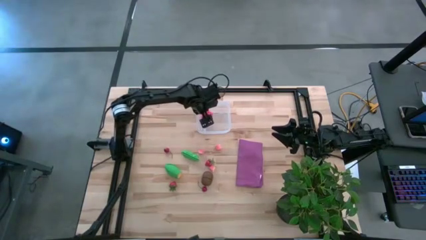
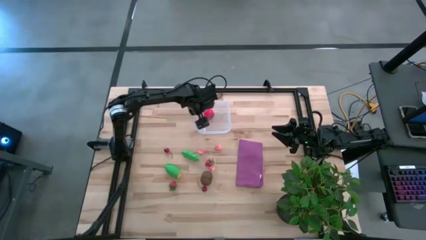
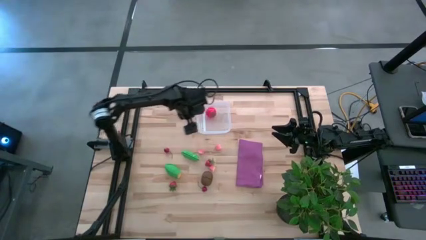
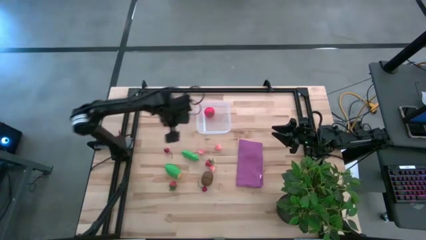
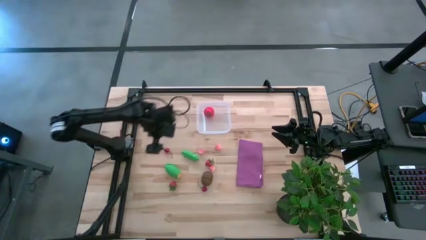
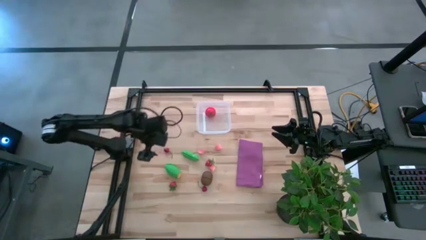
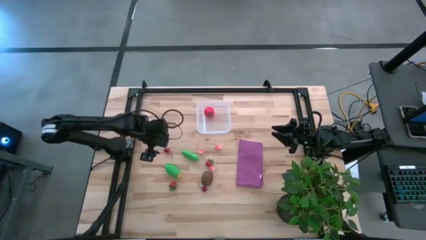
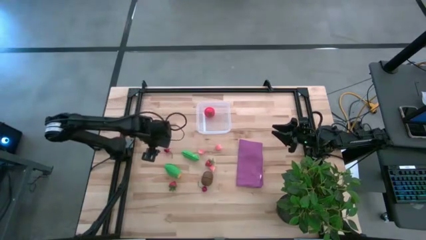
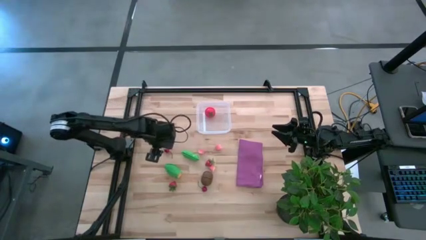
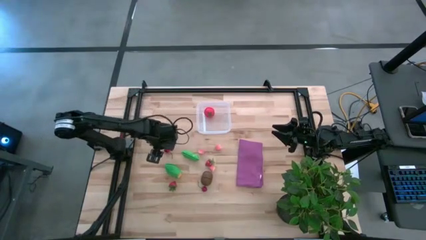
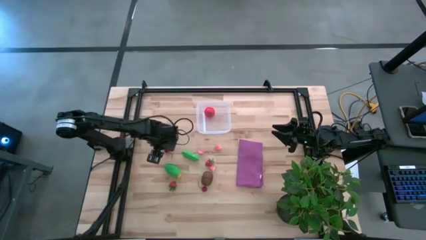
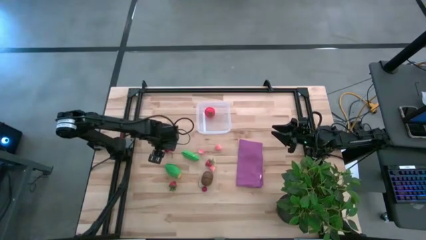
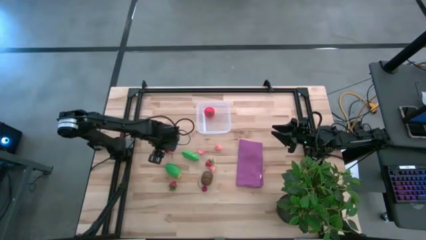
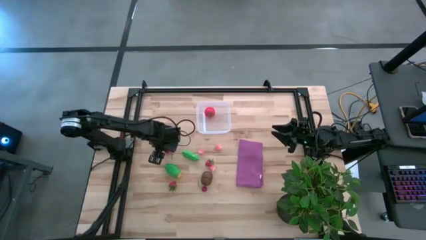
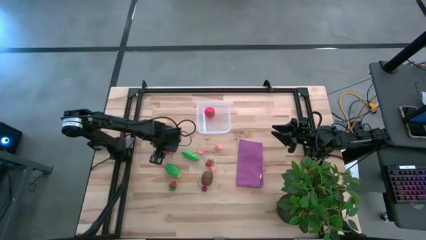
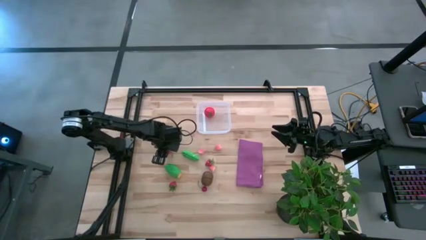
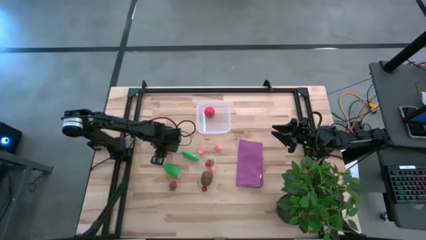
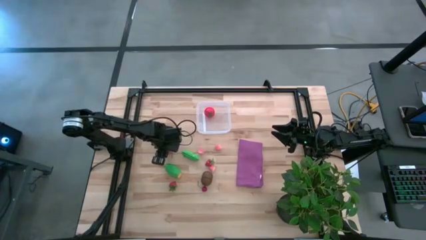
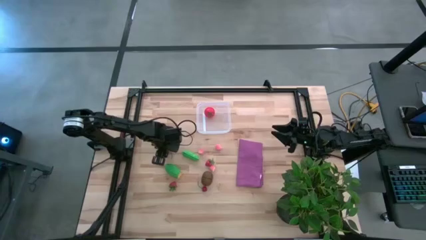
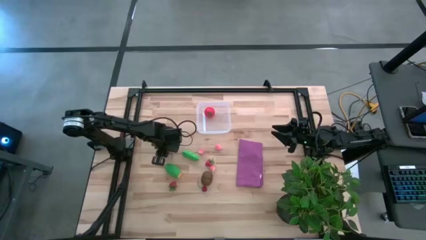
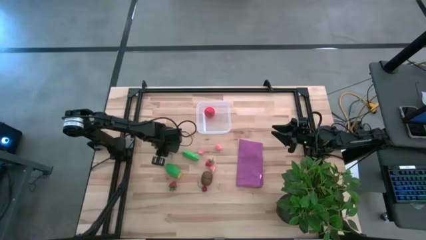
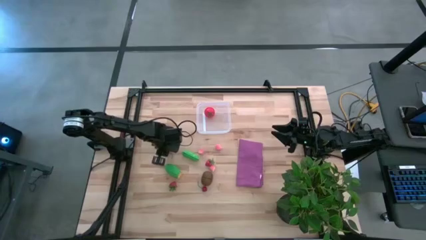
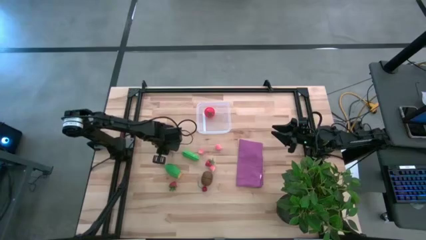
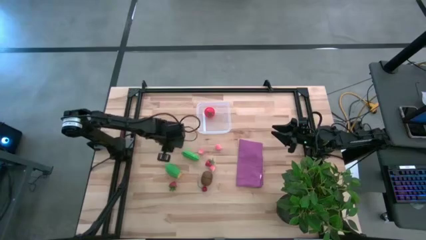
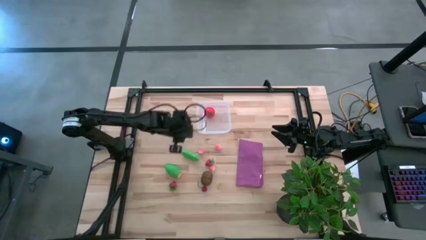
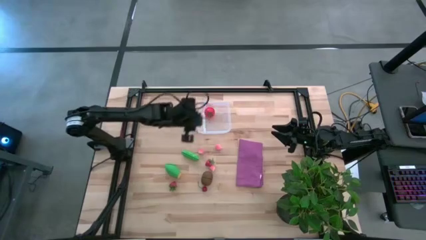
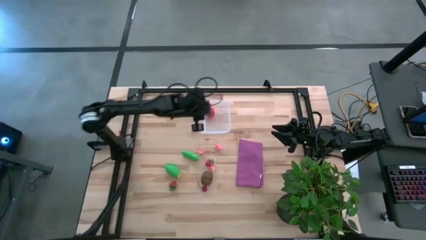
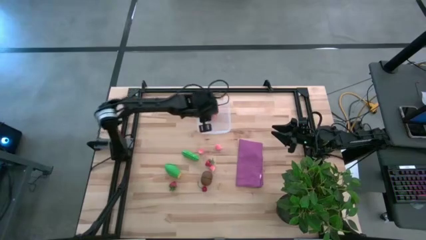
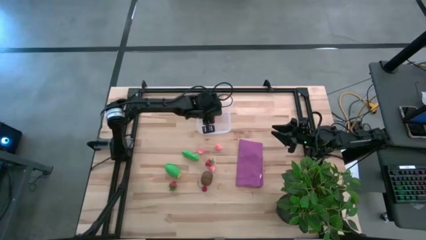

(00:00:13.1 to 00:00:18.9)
Task: Pick and placing Produce into tupperware
Put the top red cherry into the white bin

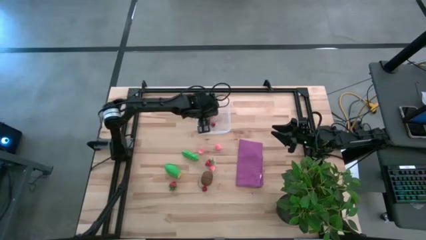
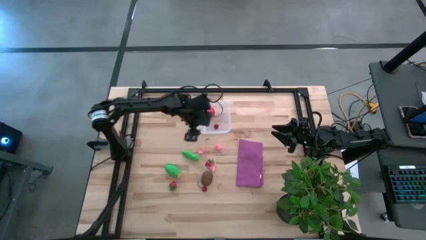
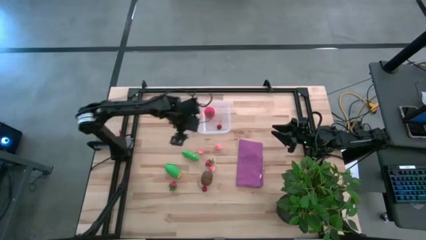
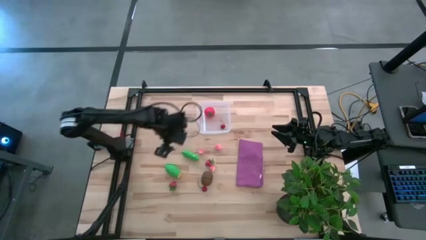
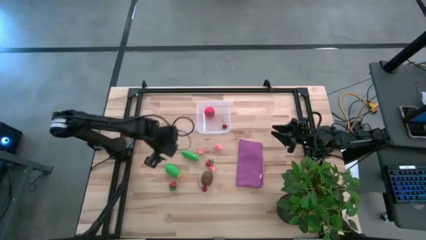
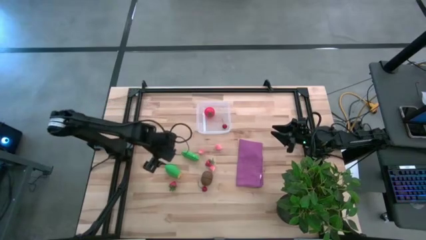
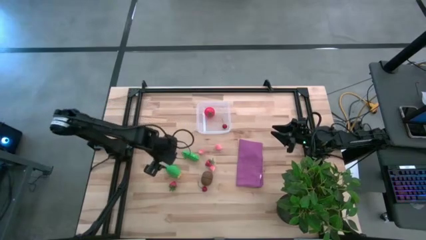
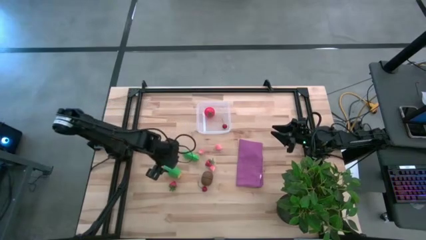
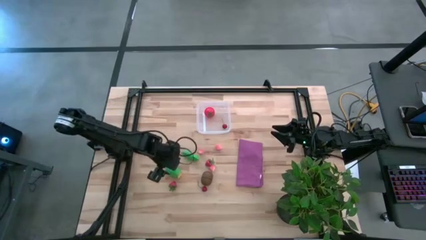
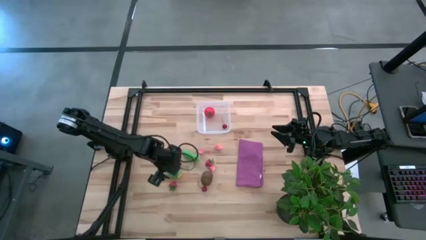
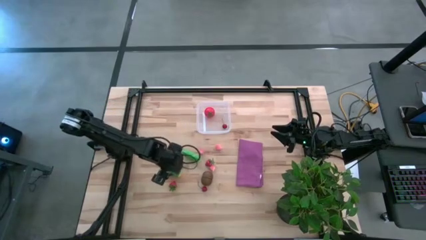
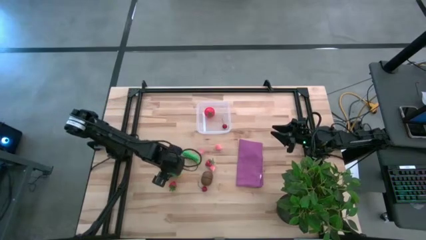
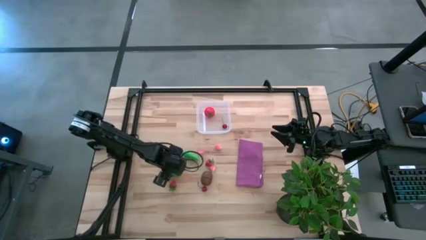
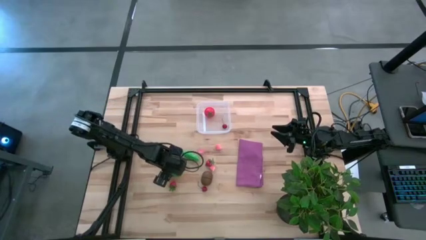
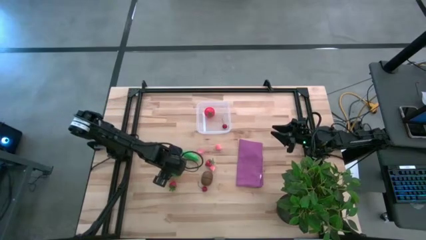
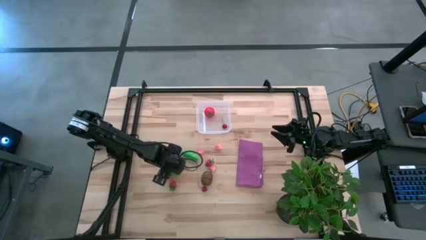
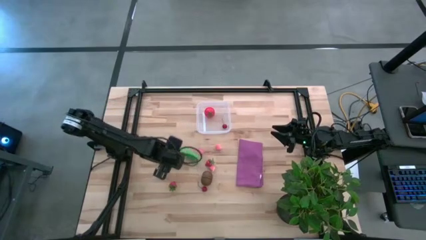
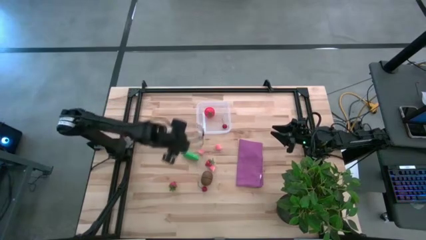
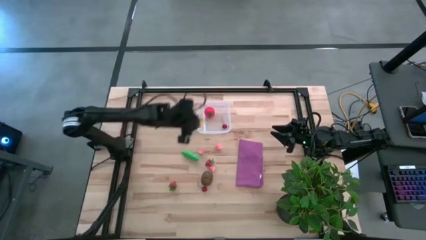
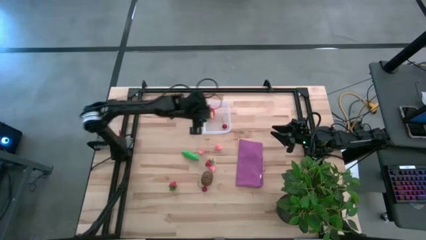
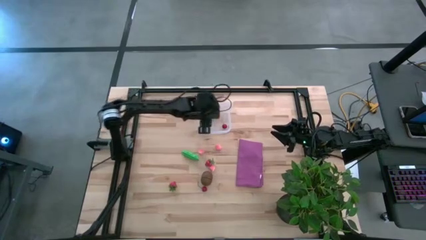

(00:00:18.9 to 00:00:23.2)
Put the green corn into the white bin

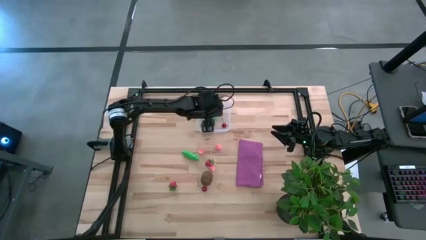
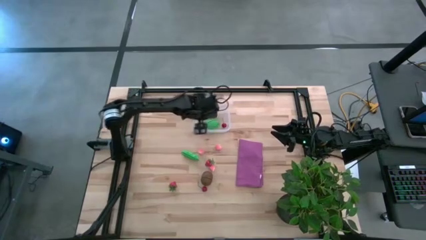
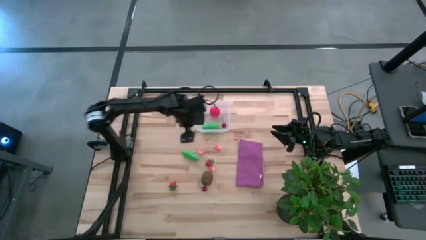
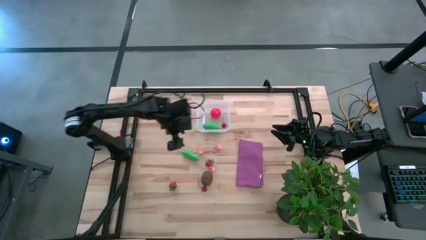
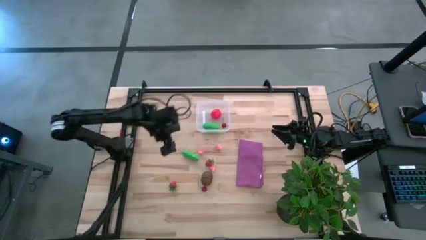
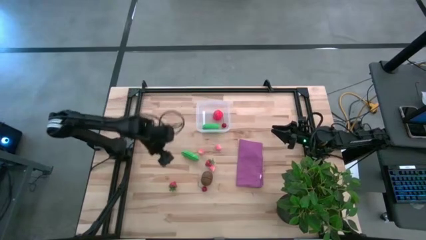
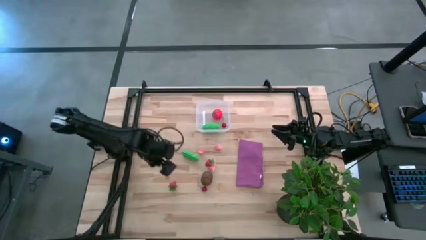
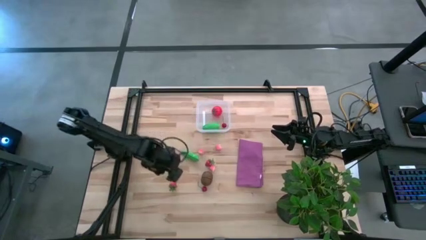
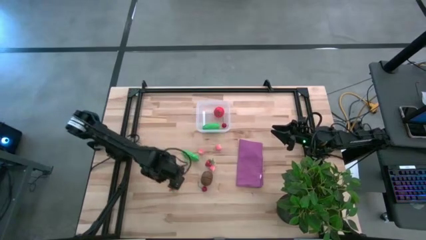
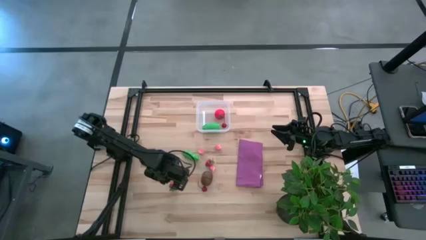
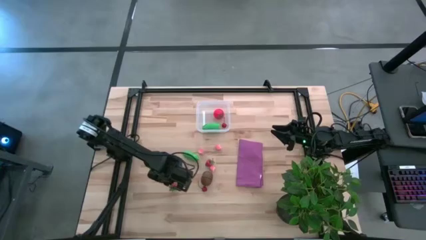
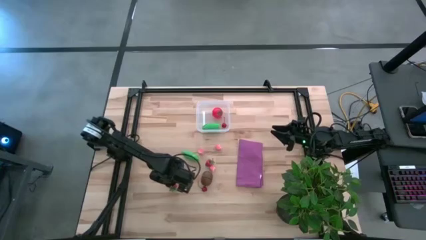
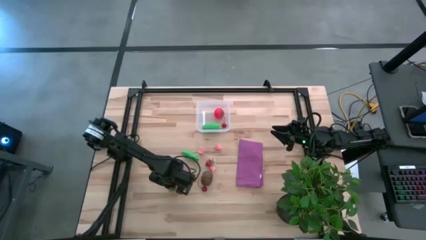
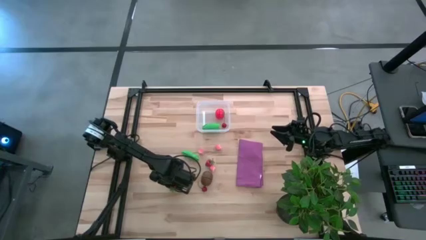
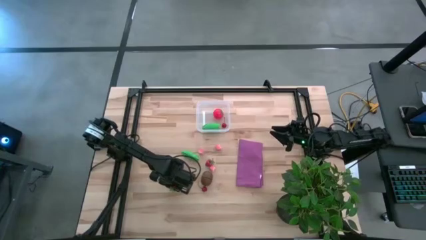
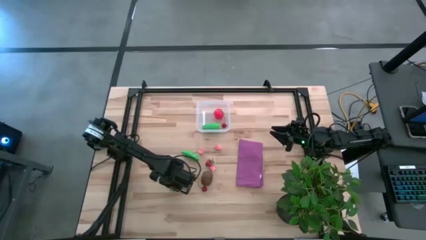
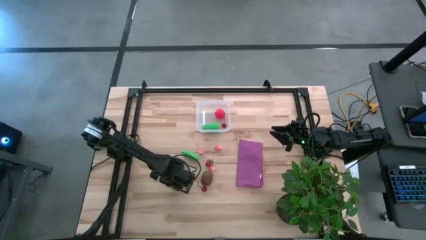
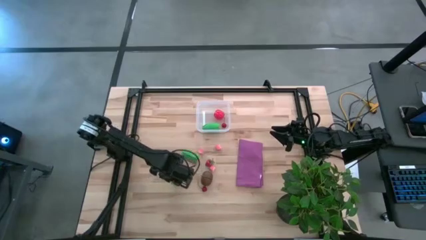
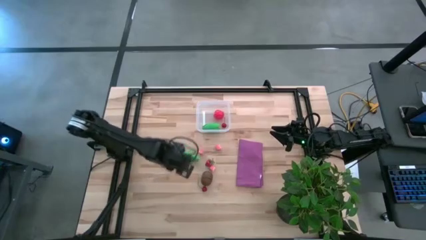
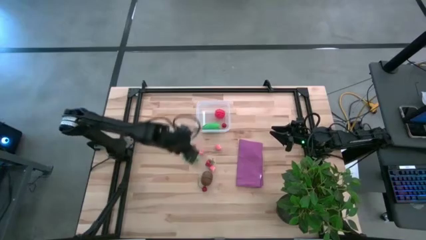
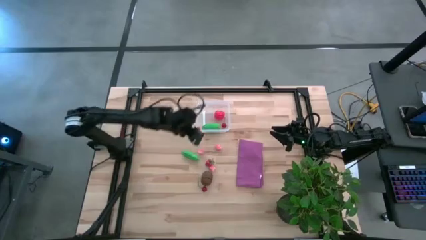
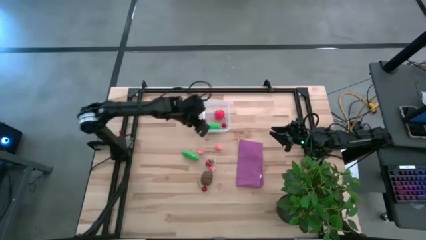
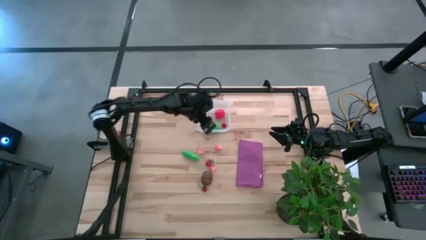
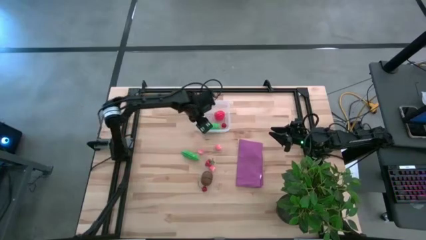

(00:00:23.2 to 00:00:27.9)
Put the bottom red strawberry into the white bin

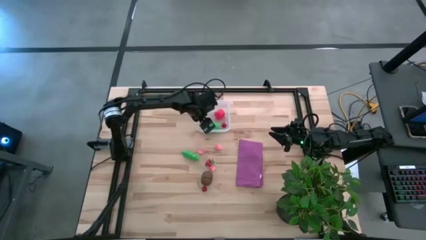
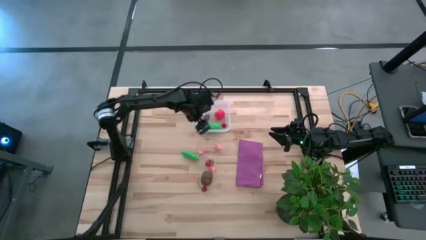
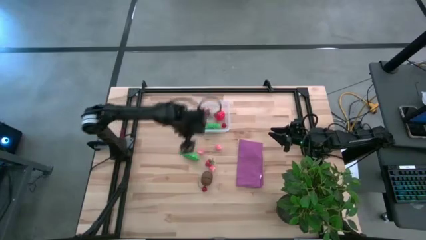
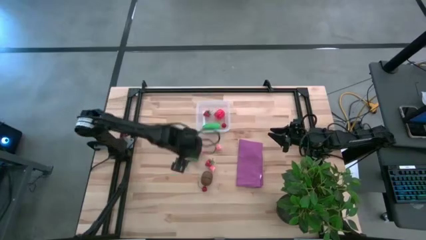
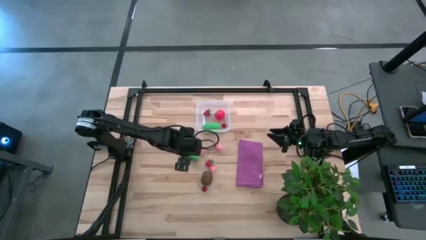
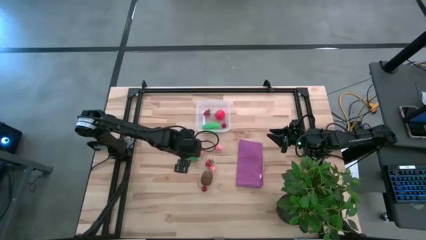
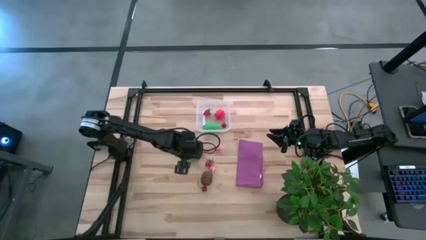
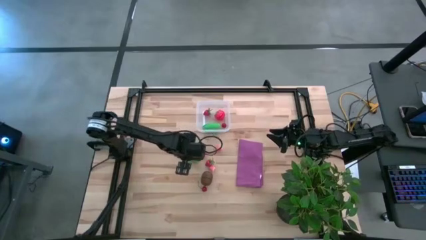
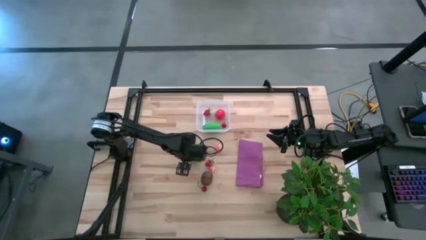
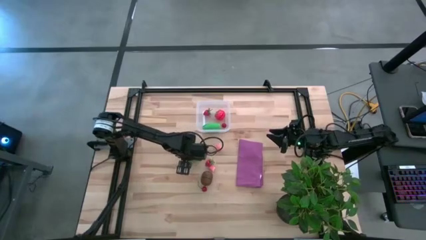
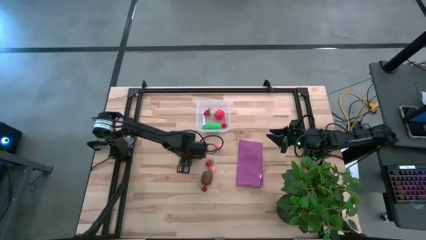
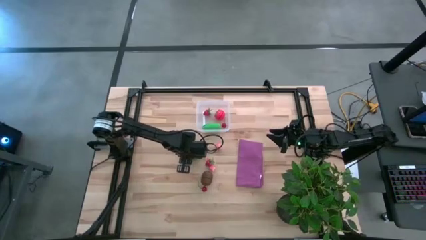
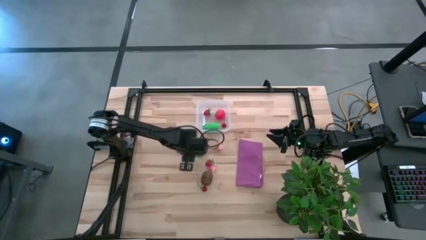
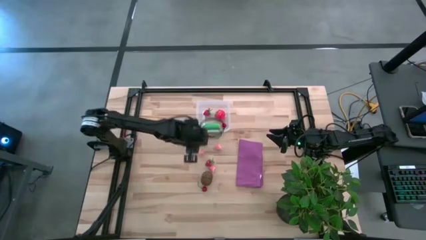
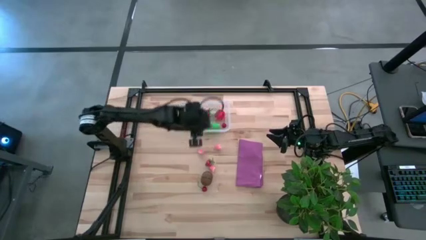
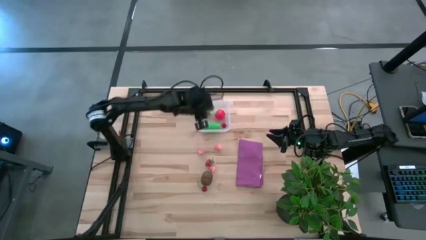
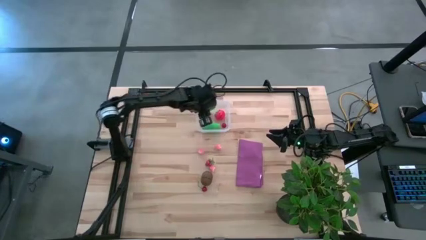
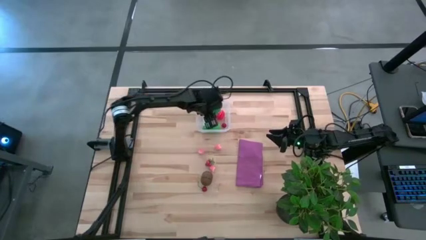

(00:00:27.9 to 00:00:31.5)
Put the green pea into the white bin
